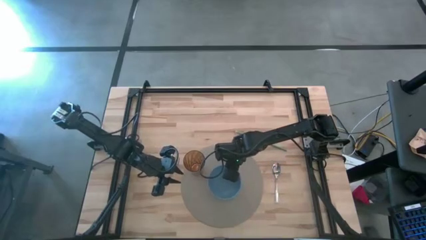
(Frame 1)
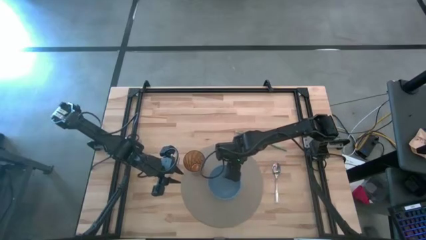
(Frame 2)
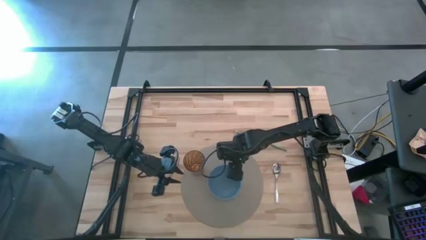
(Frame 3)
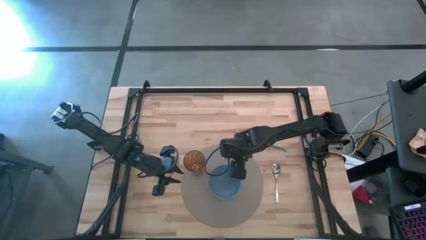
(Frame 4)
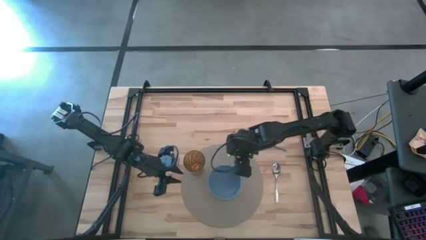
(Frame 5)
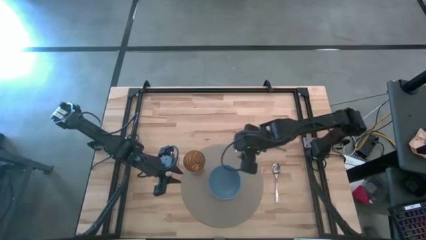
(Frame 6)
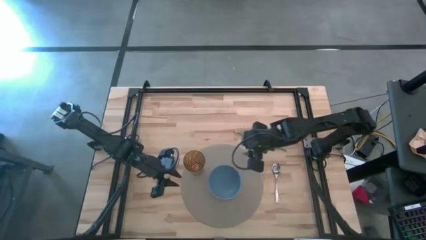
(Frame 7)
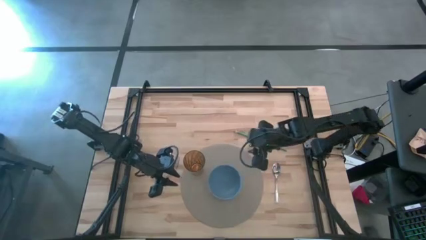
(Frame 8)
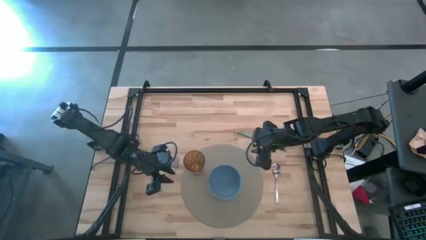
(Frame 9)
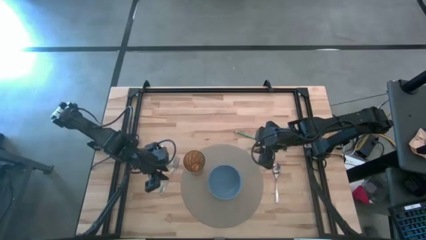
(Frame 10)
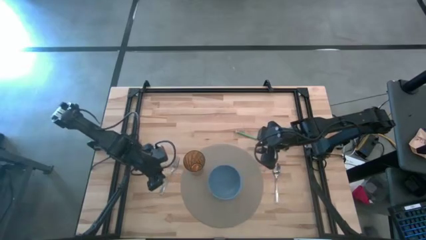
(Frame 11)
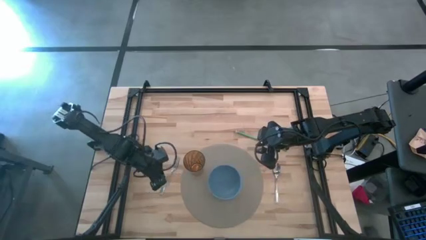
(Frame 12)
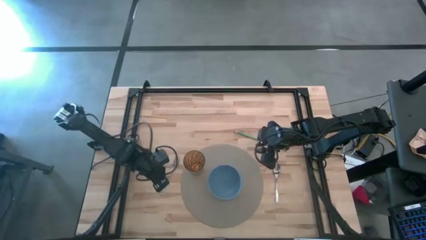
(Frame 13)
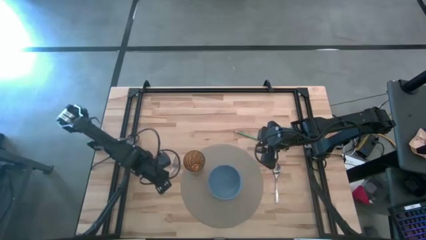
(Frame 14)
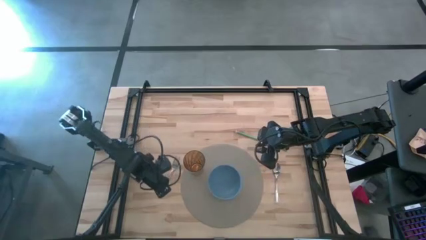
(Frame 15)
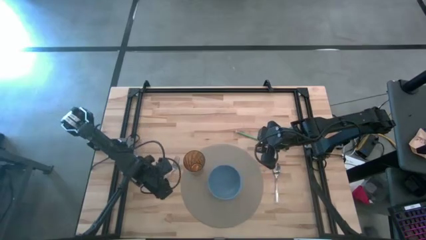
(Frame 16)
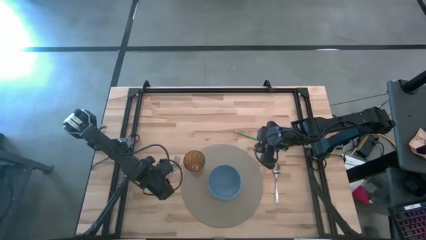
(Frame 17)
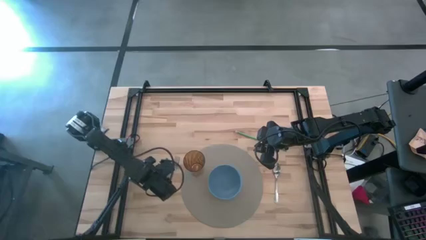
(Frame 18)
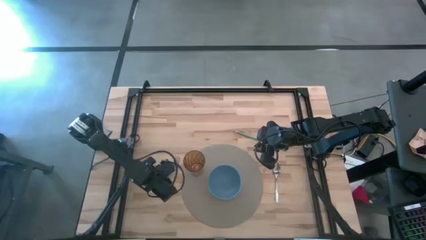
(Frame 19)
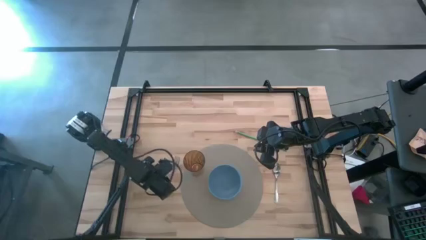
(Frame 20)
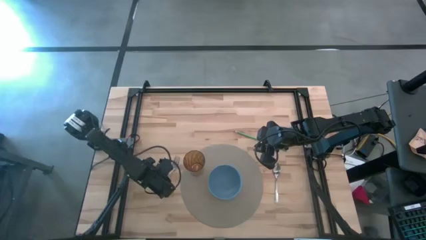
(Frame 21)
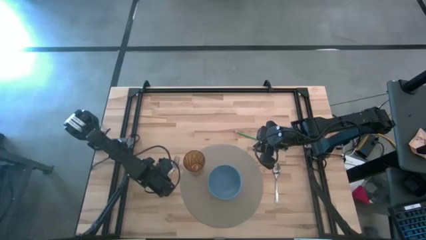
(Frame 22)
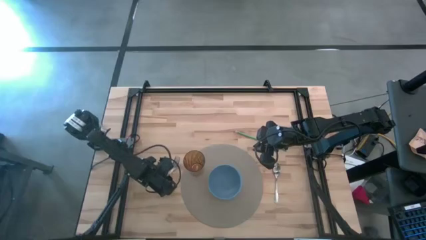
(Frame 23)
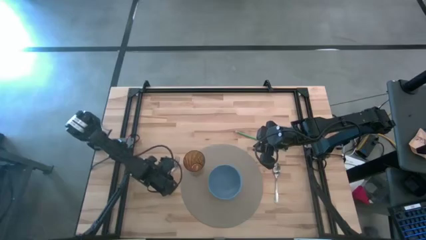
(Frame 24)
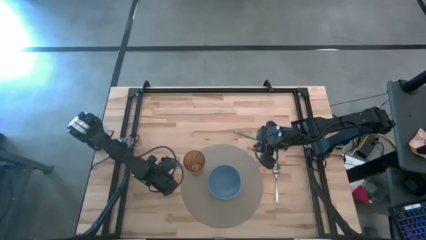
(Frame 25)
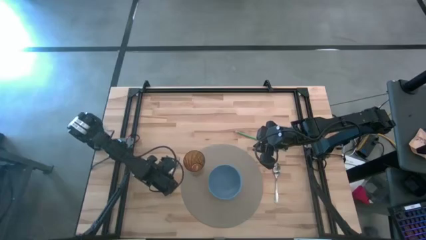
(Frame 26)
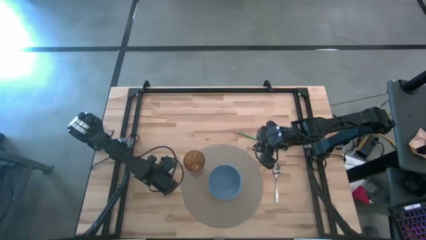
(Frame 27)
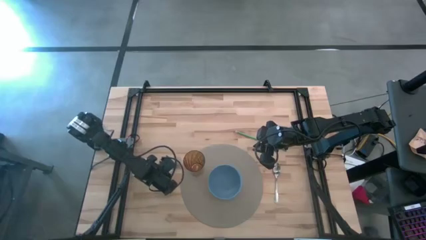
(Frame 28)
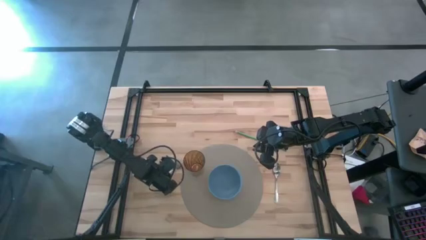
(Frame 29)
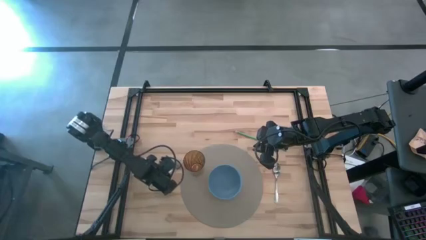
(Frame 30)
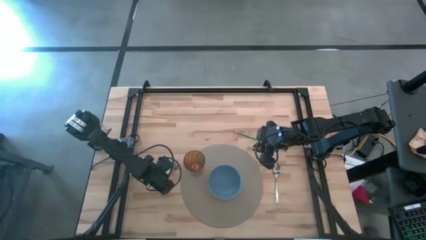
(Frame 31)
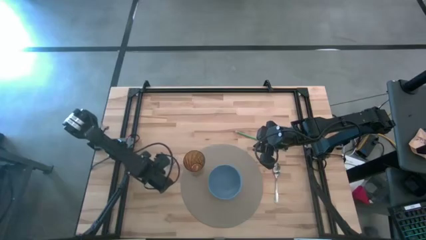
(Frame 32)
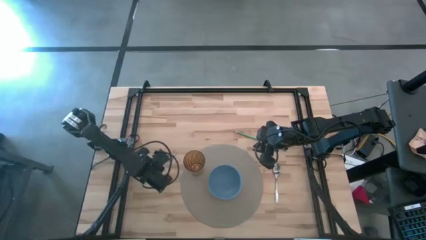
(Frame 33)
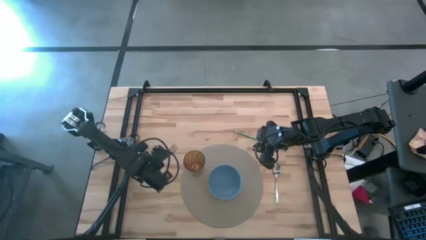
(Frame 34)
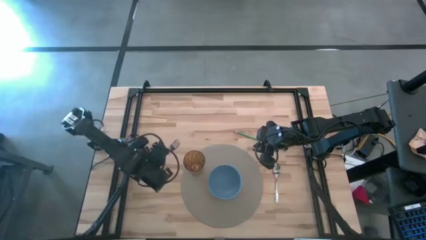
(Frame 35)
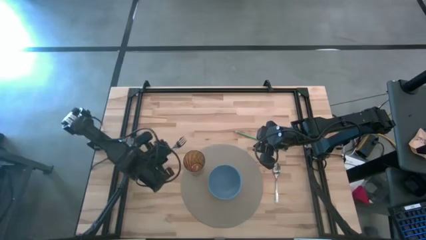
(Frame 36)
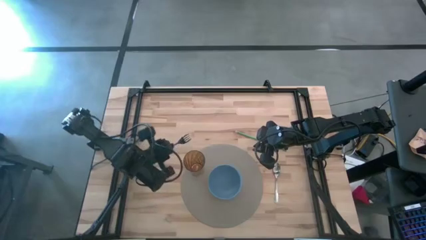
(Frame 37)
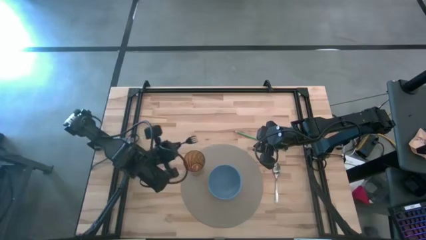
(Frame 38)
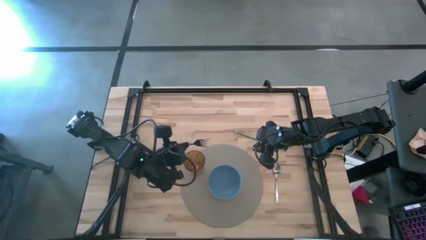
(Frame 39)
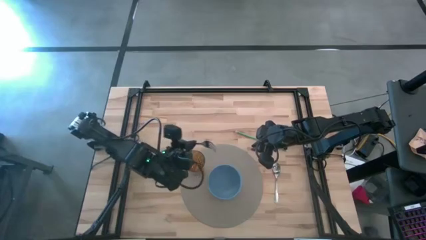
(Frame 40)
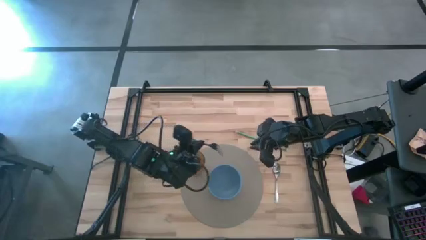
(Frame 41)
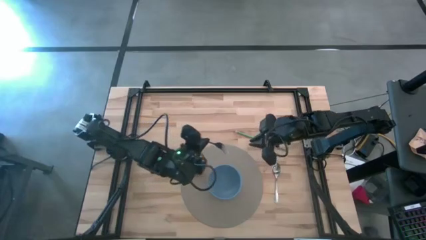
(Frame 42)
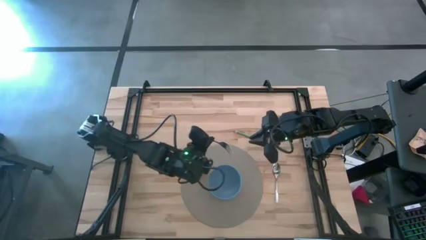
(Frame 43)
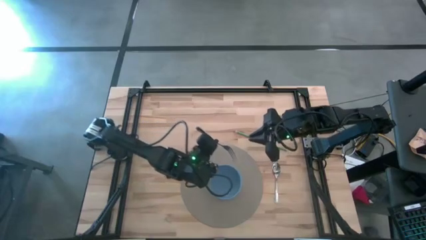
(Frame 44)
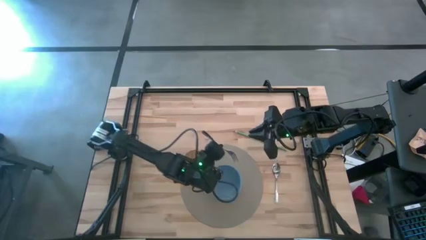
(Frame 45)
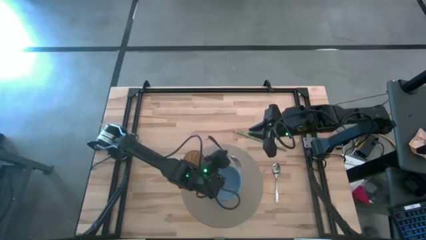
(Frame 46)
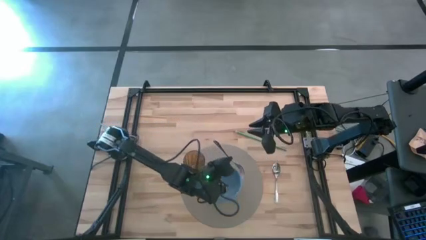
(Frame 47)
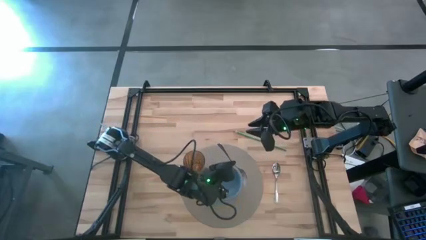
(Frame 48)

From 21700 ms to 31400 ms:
Task: Pick & Place Utensil
Put the fork into the bowl on the place mat

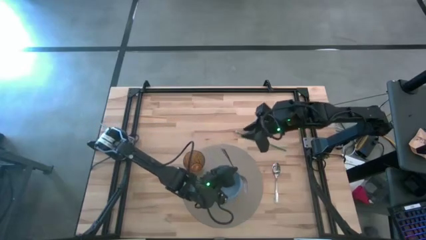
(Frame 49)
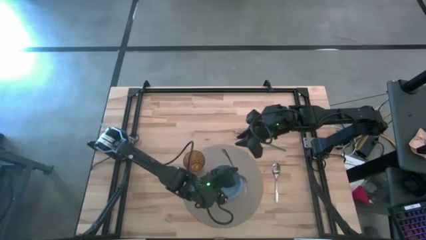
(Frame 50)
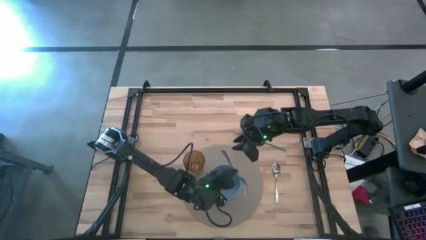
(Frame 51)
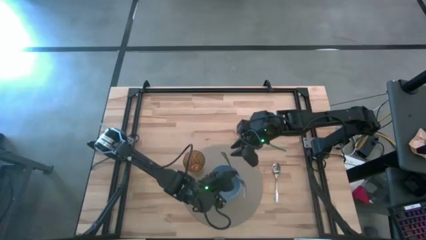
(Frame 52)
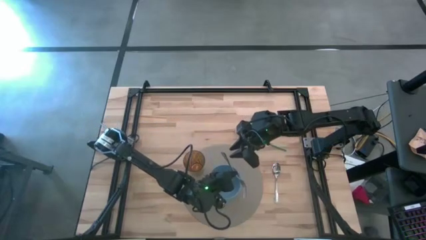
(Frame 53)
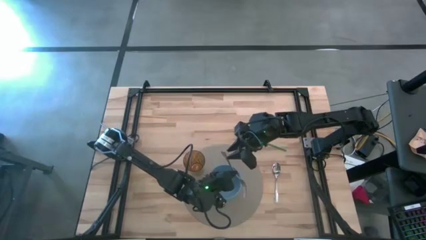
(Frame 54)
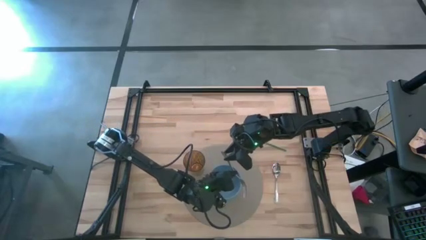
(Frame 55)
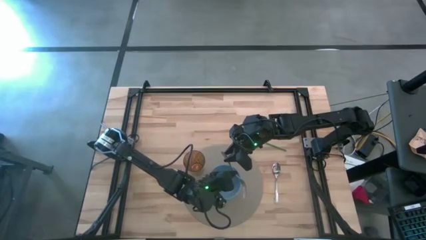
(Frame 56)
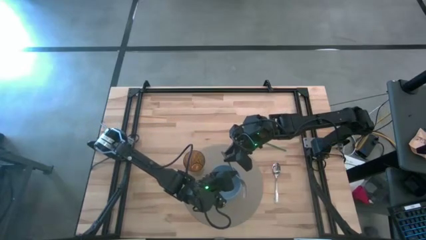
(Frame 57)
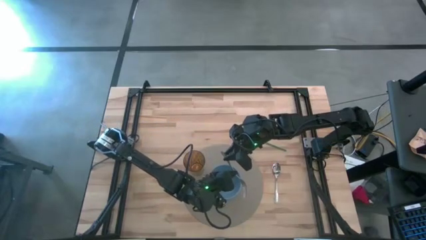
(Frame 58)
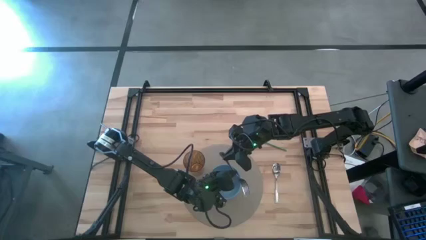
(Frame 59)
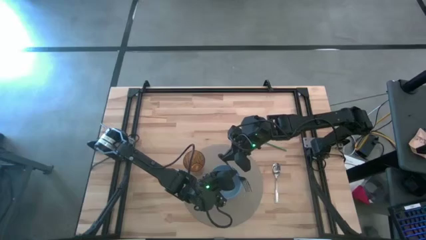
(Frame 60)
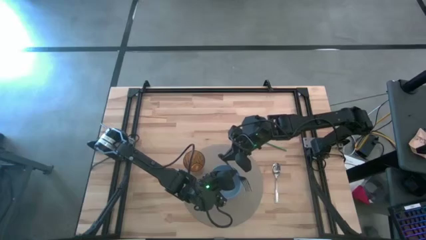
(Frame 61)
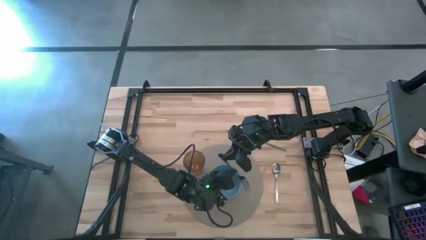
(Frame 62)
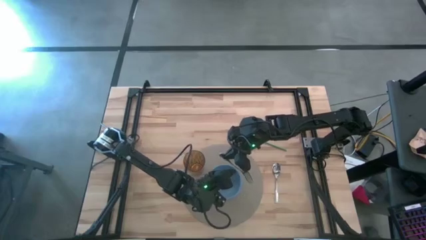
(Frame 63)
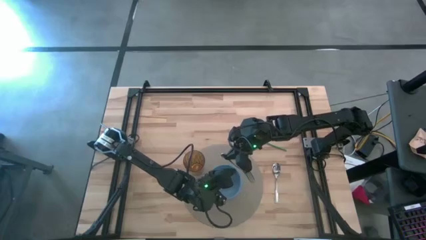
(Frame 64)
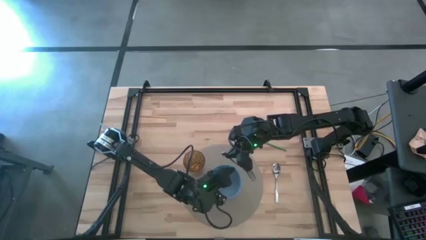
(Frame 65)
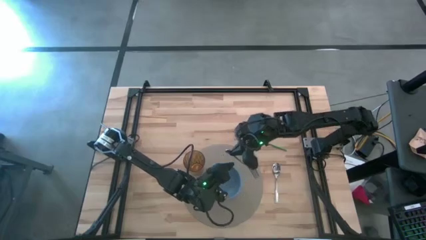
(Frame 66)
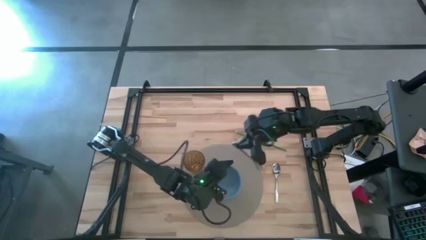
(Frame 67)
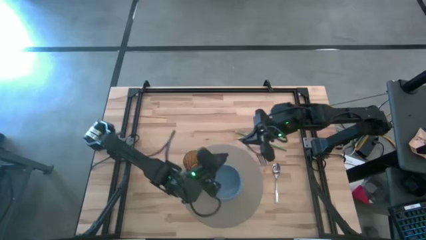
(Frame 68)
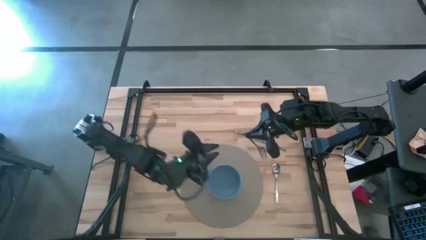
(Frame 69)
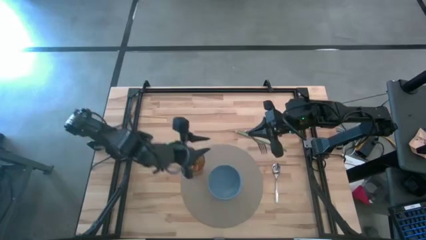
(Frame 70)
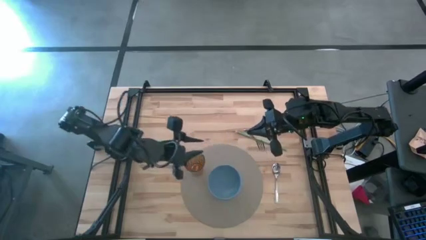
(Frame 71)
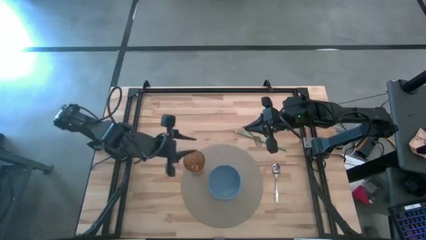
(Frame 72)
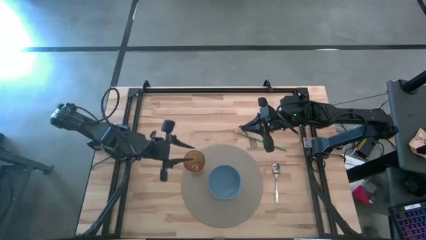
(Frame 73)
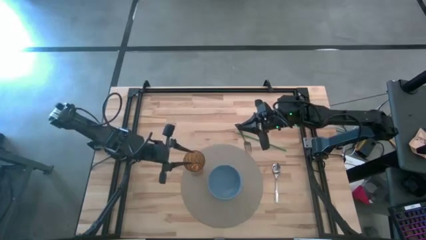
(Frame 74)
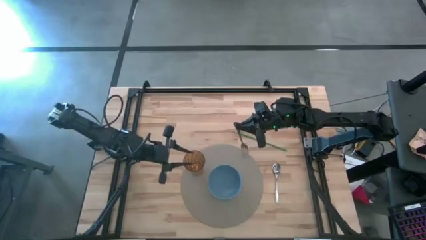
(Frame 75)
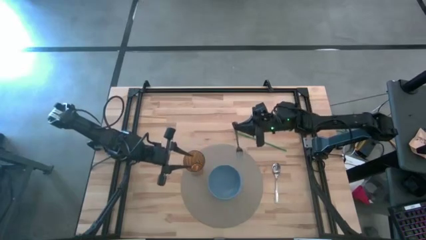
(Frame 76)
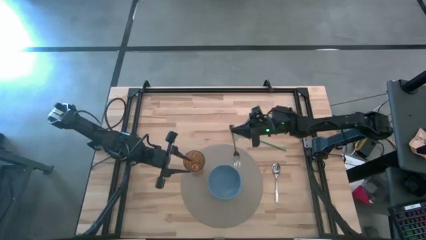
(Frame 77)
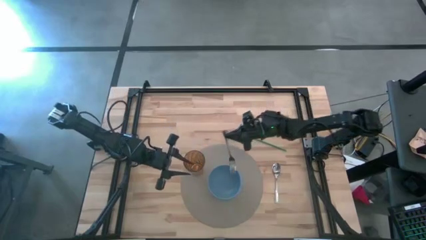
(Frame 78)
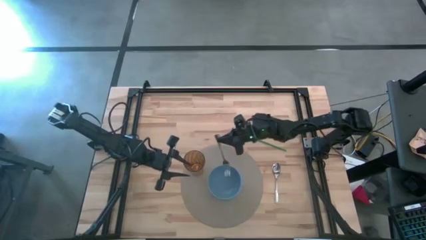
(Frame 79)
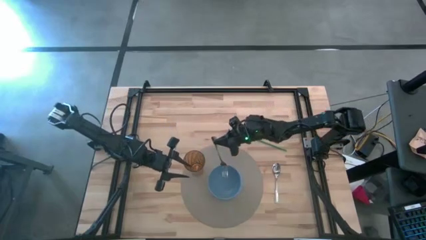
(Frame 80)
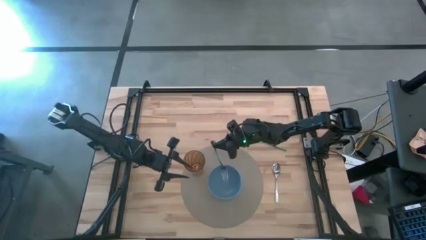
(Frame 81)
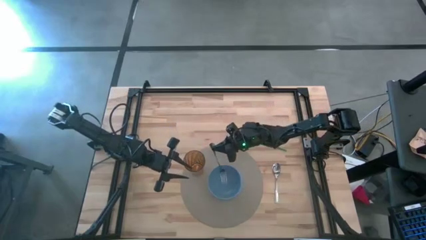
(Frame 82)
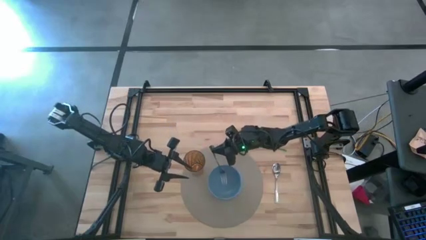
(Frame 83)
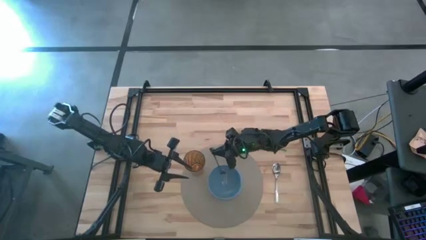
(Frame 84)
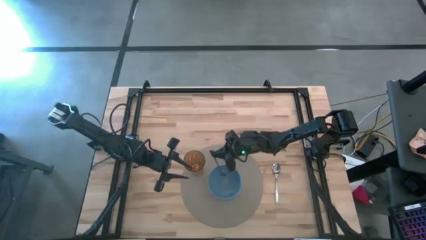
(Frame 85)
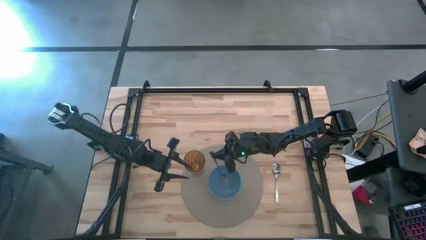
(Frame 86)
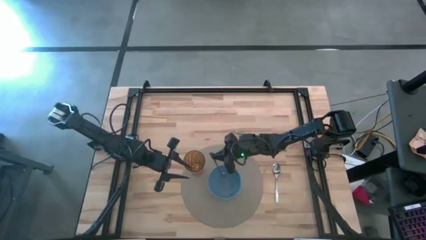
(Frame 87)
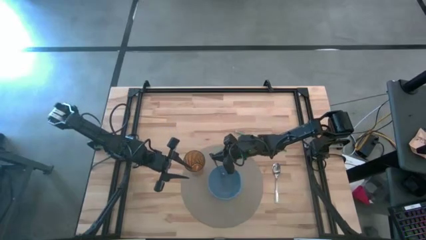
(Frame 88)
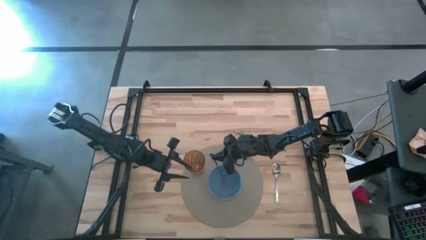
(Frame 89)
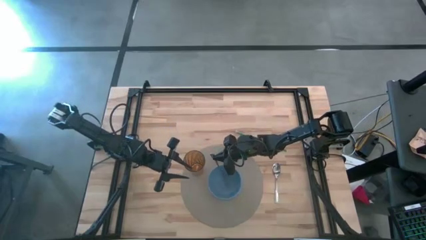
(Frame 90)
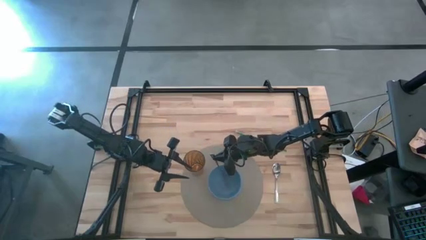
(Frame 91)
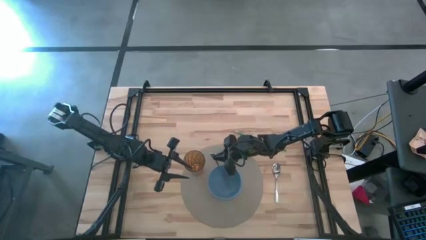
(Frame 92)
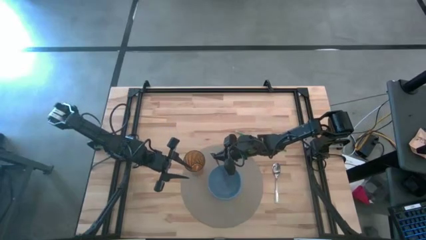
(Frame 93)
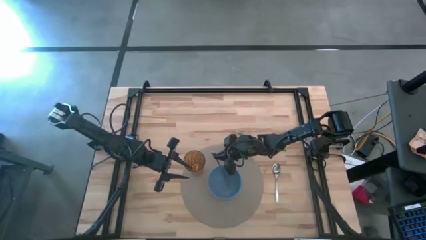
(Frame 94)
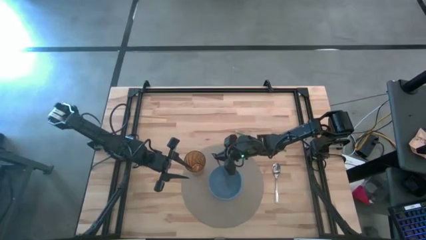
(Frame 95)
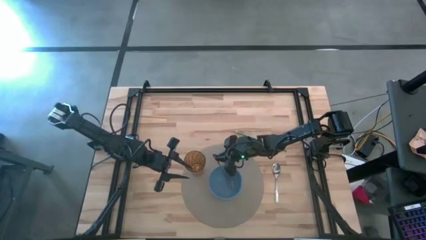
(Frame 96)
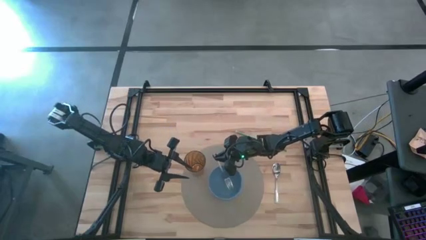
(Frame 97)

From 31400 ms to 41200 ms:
Put the fork into the bowl on the place mat
